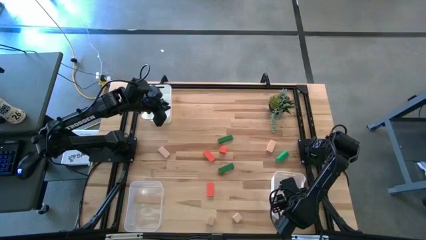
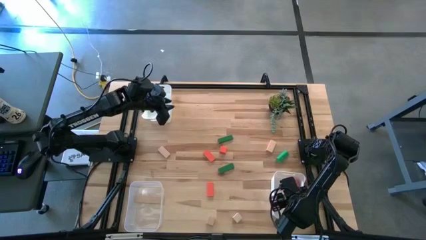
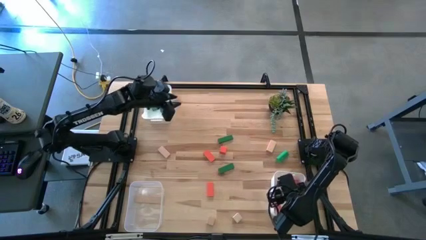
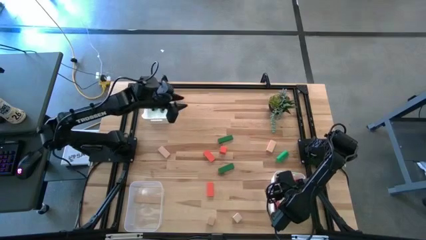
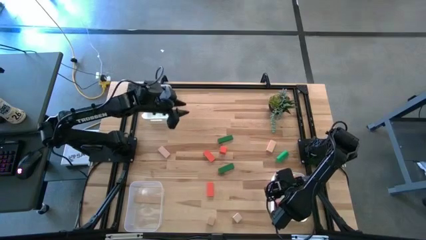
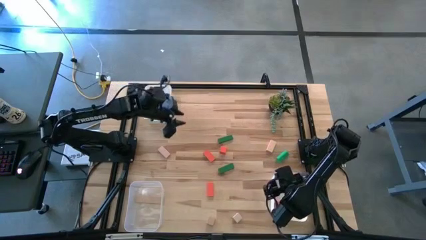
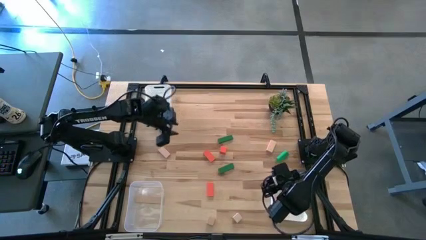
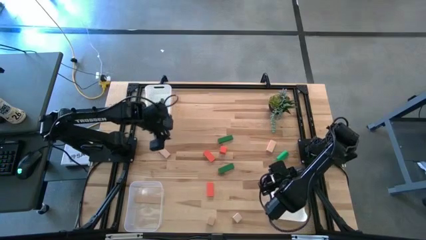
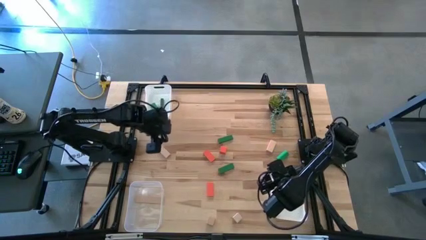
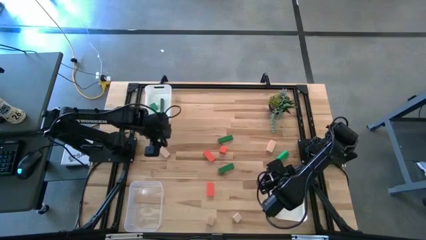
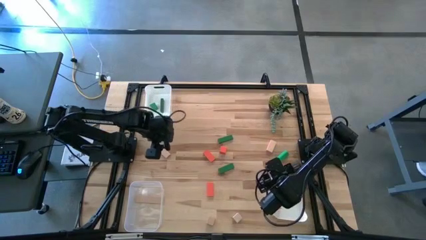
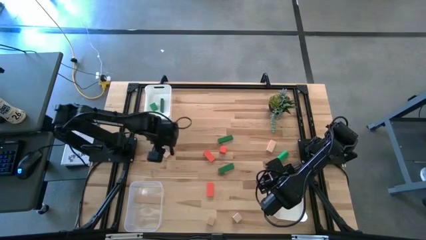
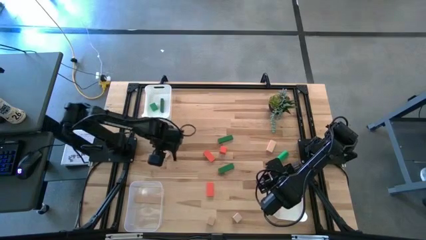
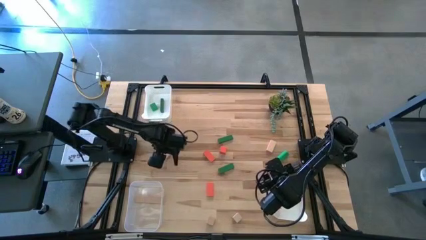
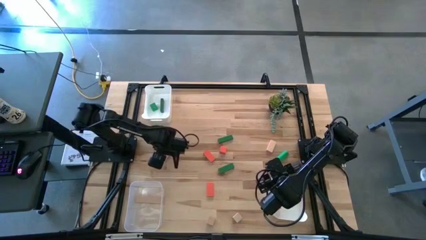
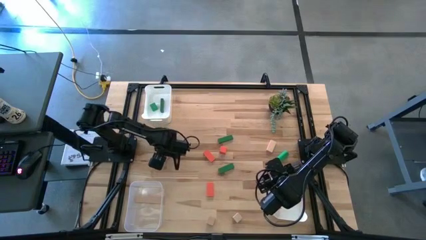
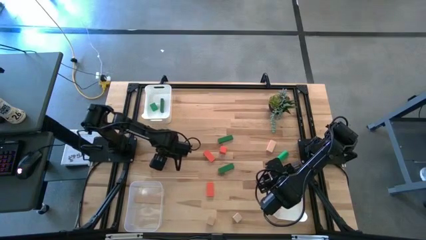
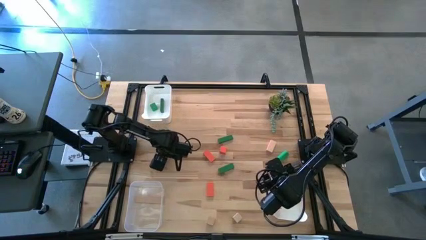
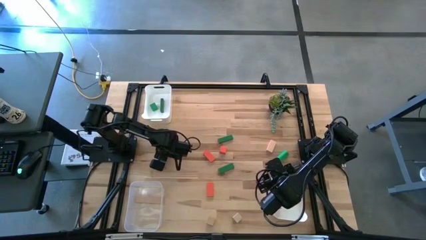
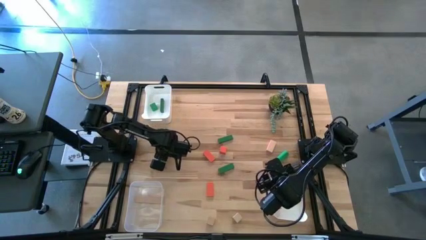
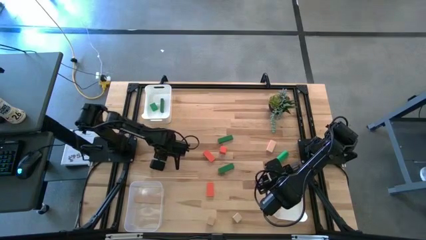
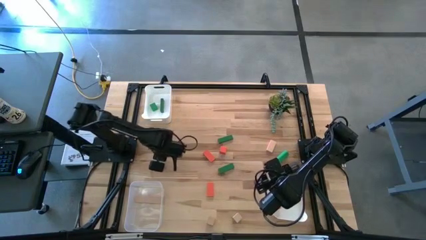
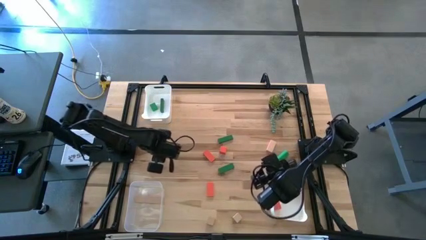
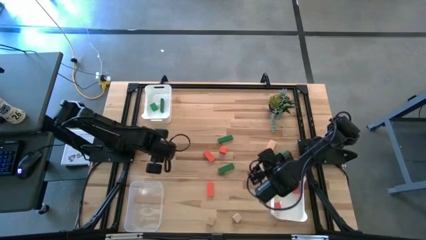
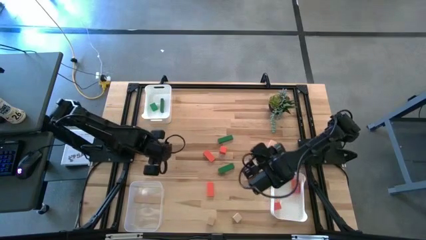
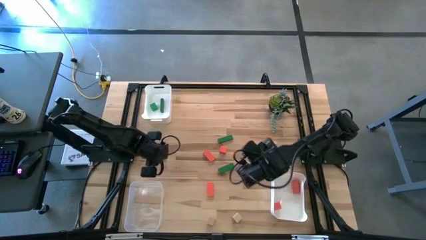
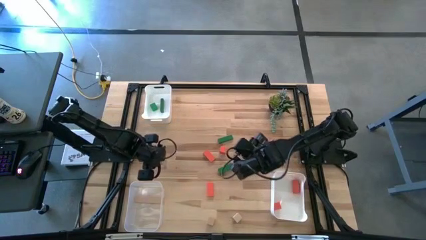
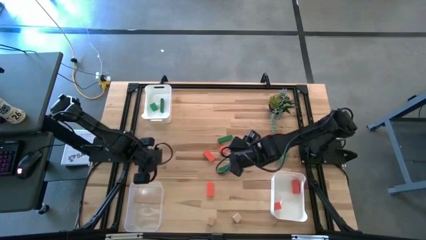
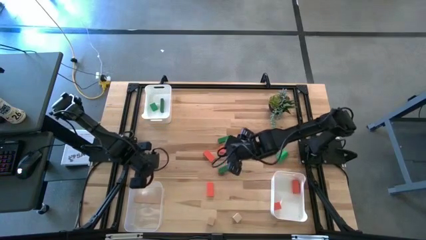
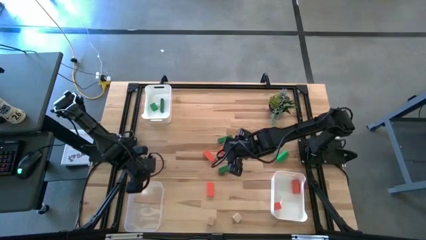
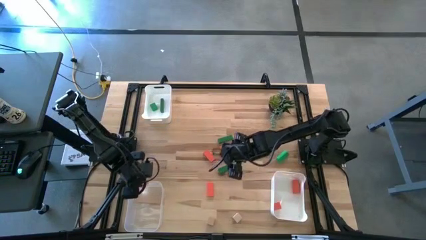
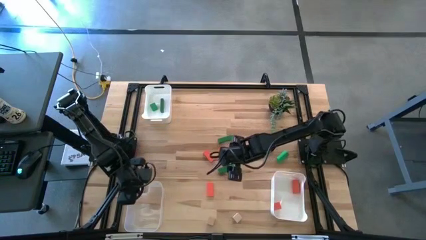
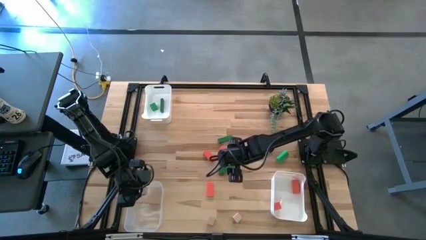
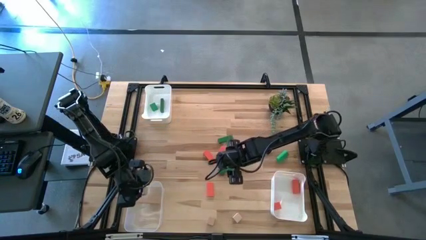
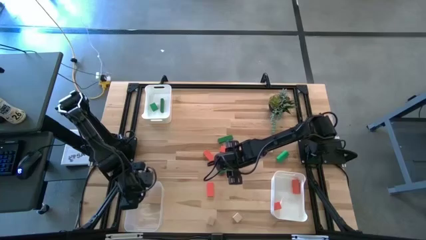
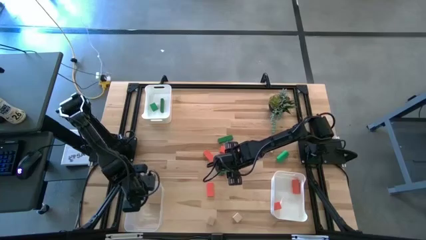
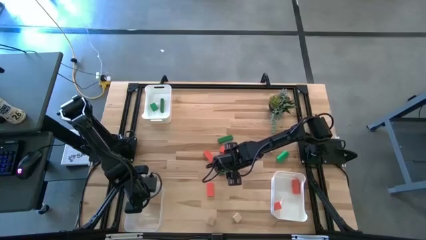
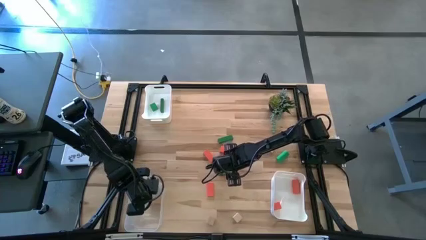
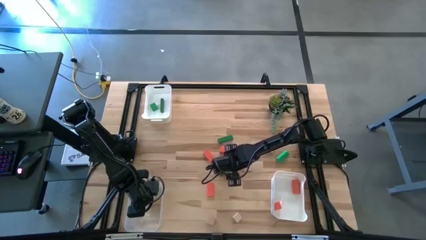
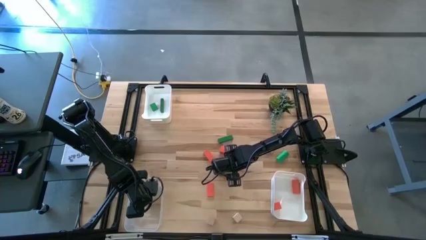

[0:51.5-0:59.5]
Task: Sort & place blocks by color
Put the brown block into the transparent bin

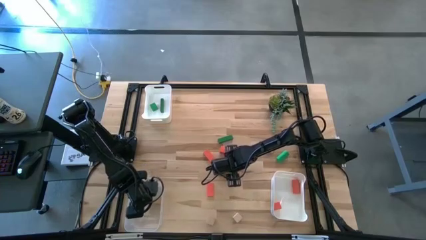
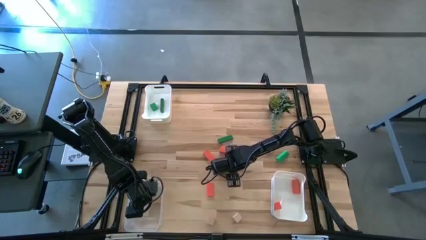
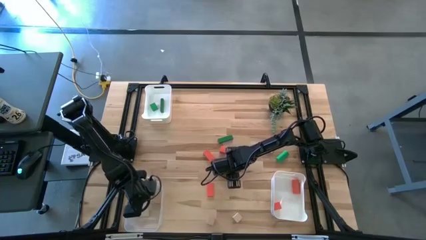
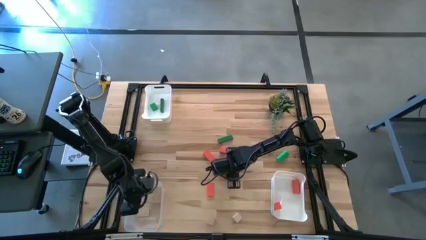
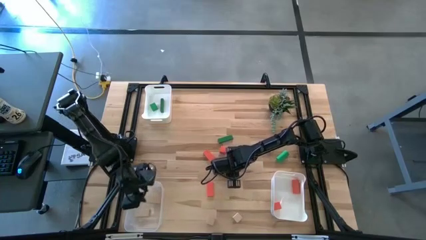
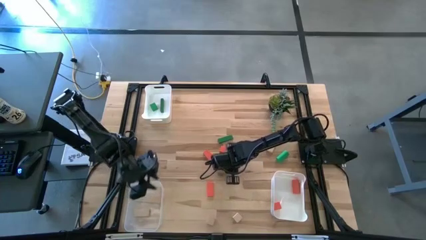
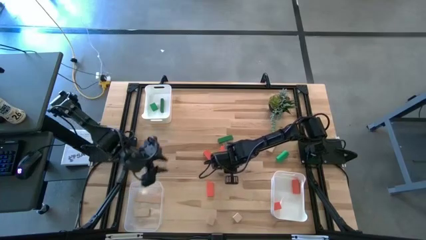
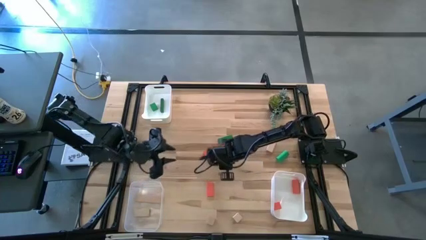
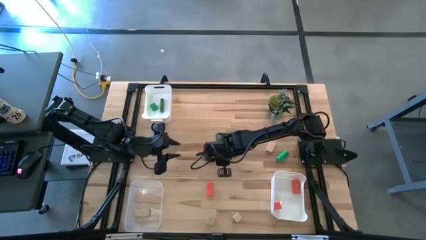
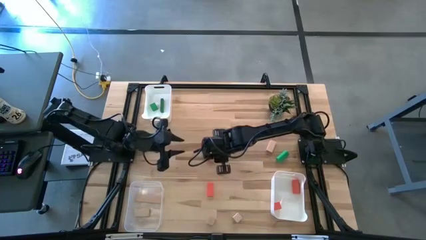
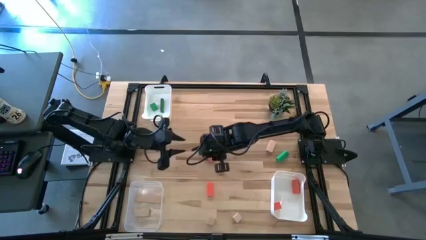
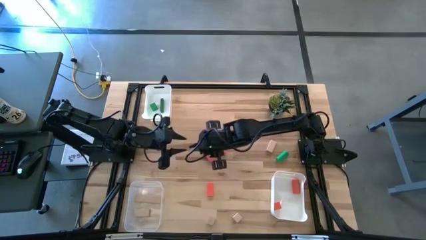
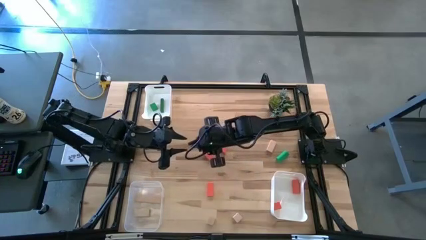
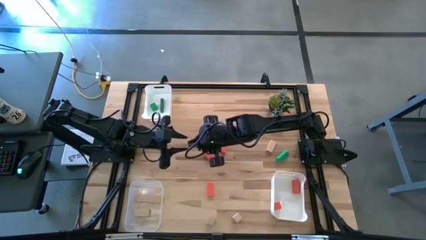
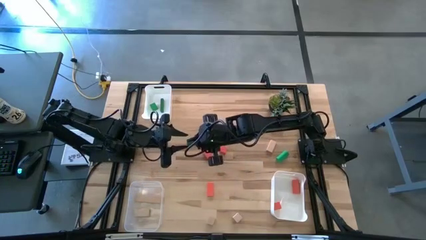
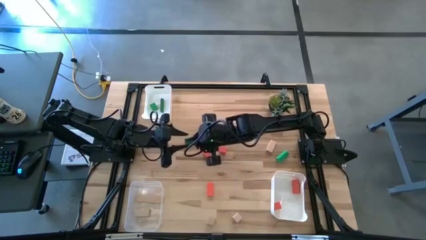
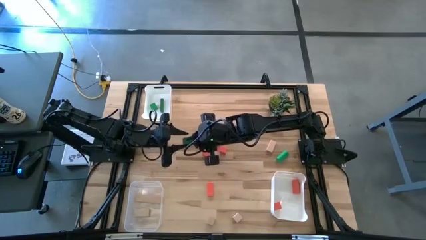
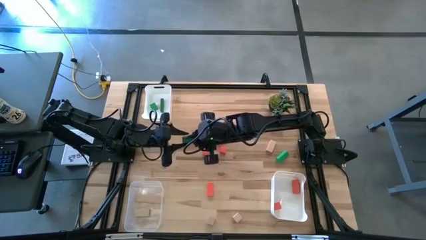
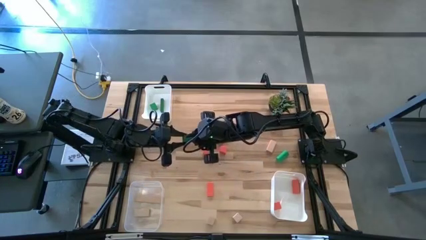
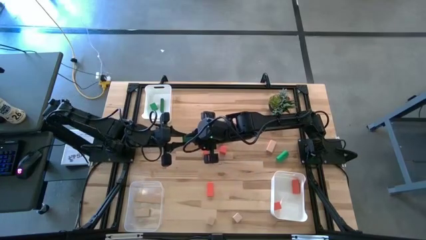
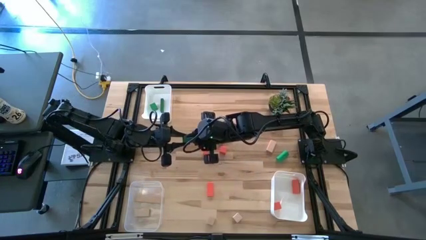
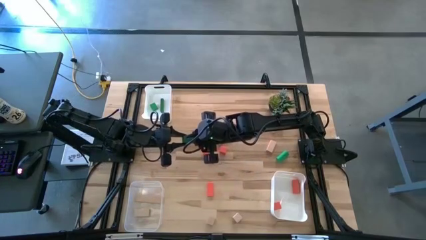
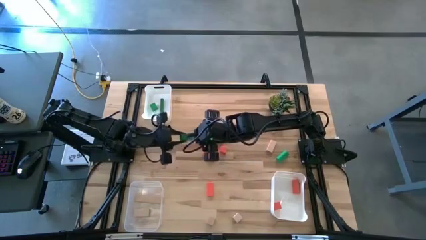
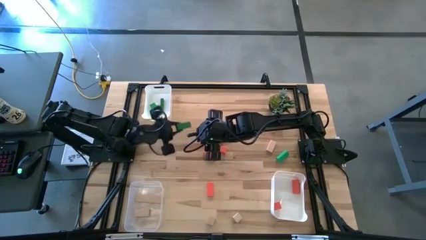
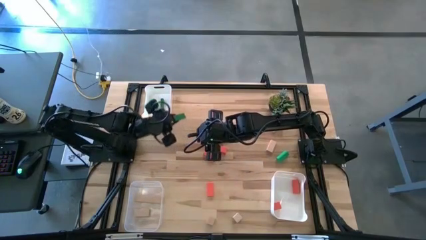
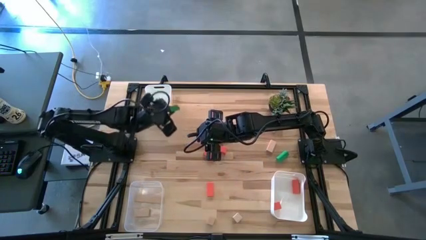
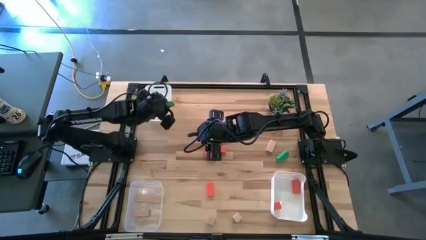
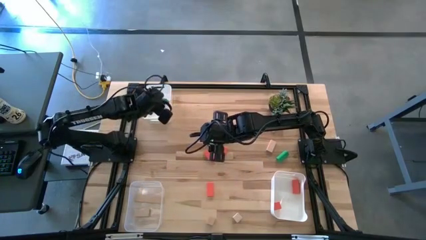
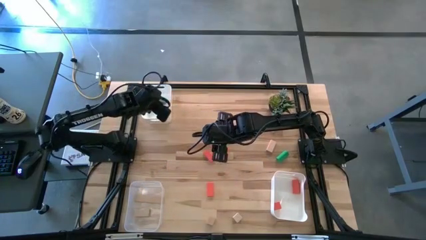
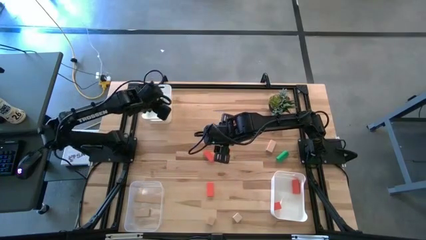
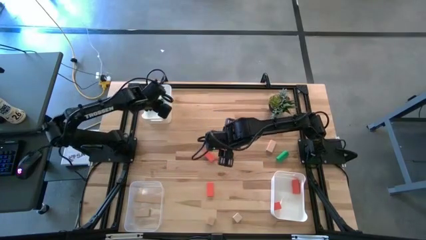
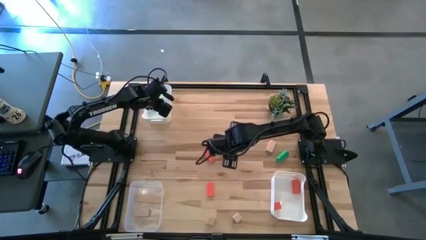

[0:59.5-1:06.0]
Put the green block into the top white bin

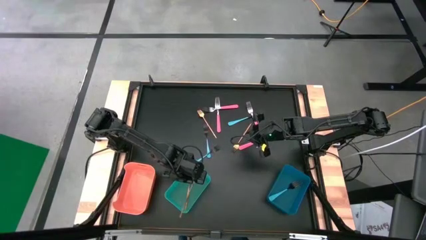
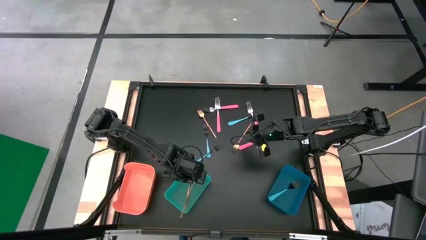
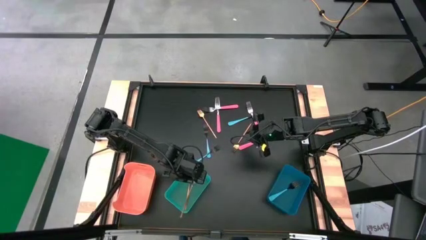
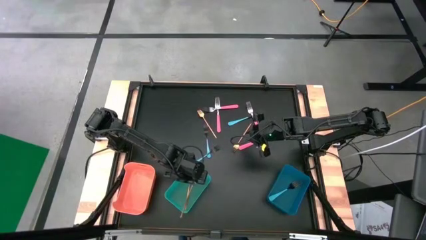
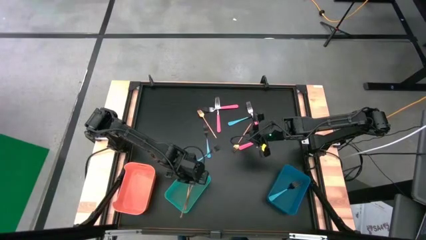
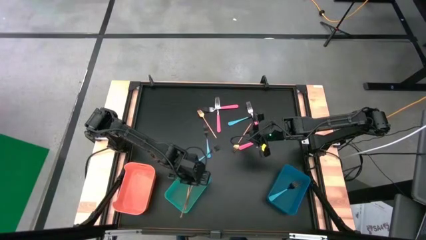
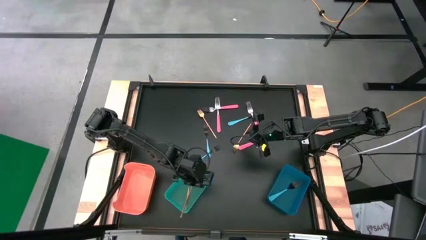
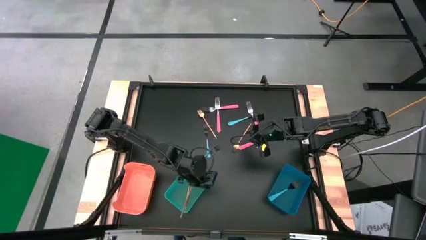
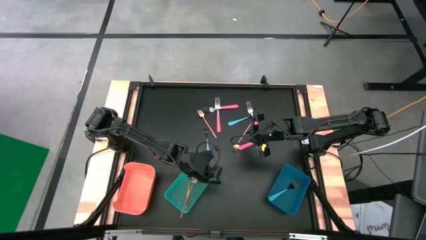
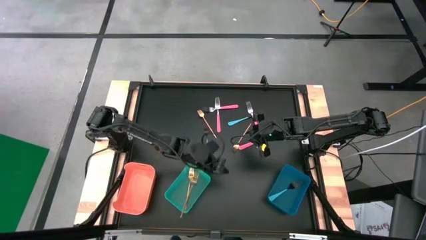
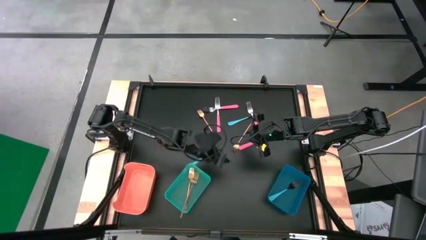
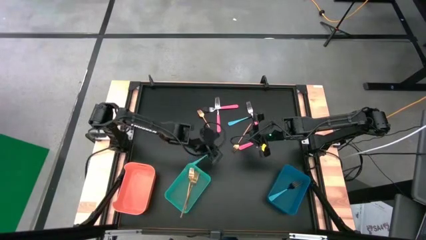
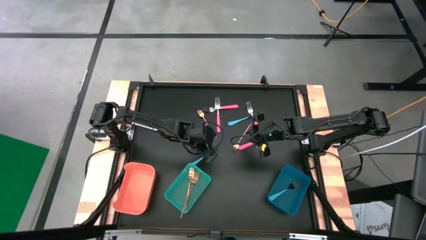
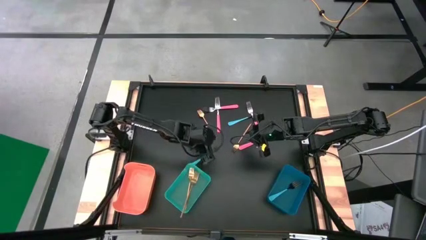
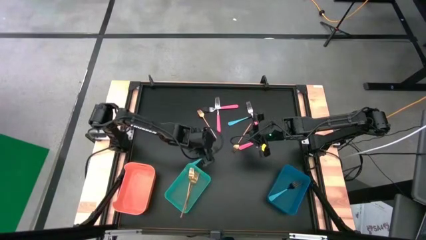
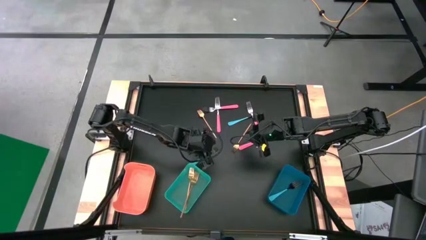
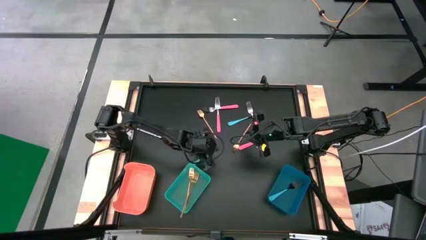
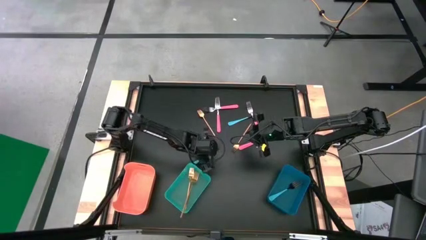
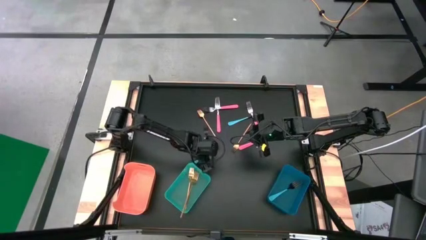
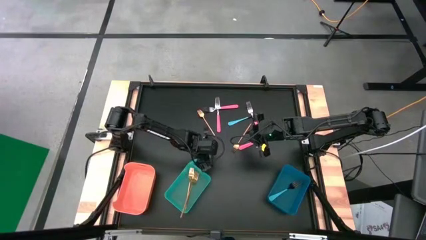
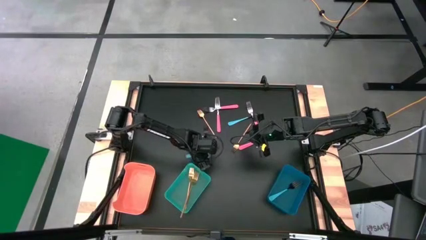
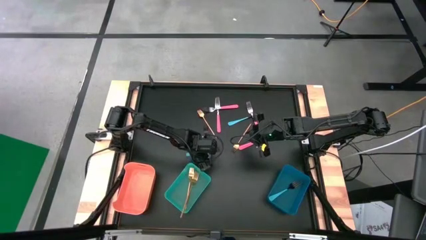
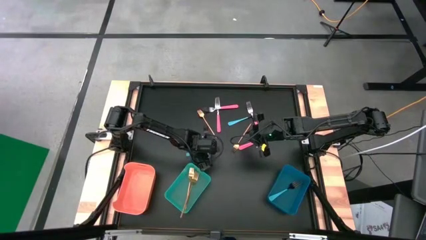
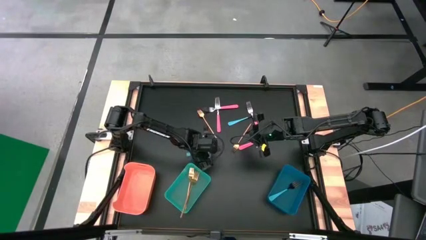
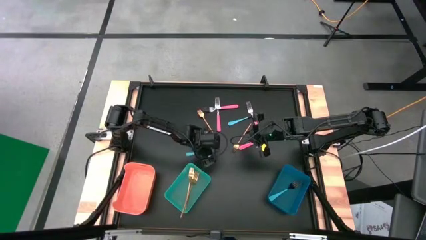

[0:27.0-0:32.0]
Task: Sort silverware by color (type)
Put the blue fork into the blue bin
